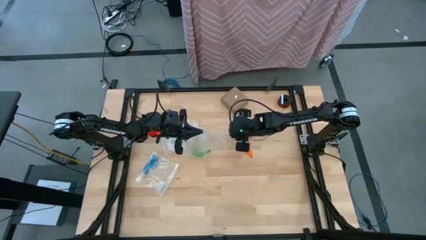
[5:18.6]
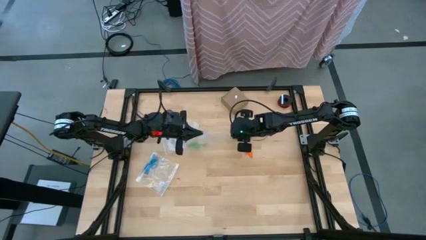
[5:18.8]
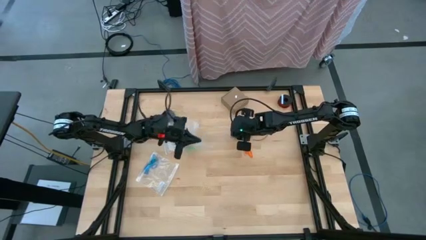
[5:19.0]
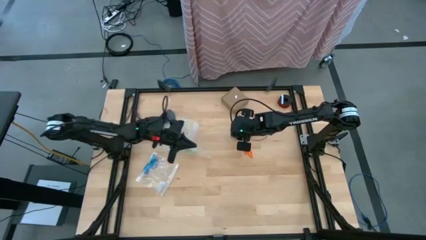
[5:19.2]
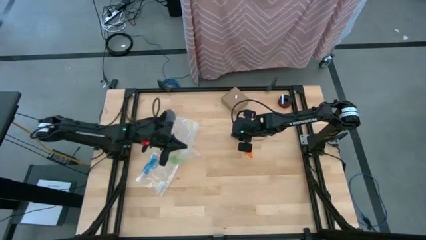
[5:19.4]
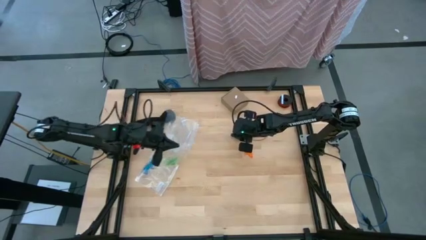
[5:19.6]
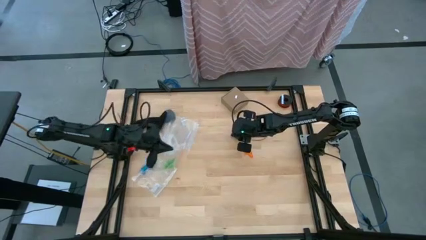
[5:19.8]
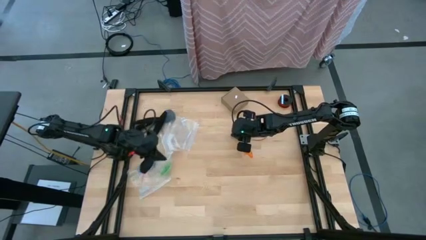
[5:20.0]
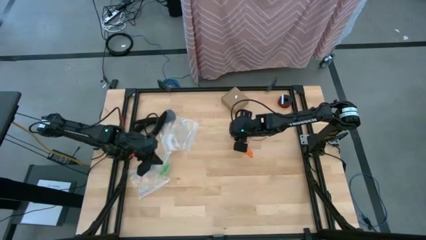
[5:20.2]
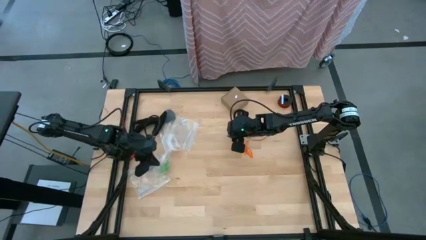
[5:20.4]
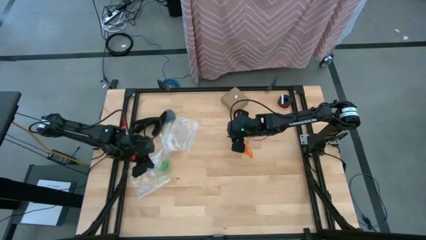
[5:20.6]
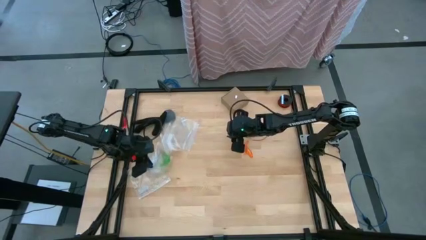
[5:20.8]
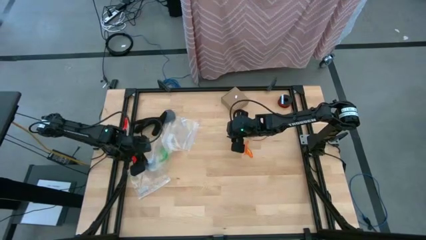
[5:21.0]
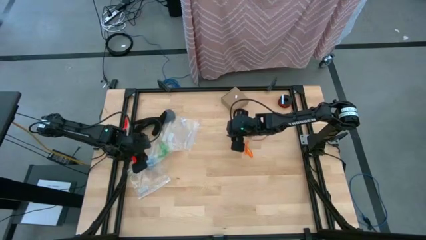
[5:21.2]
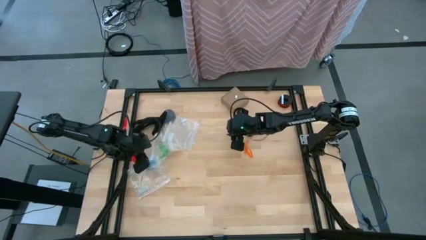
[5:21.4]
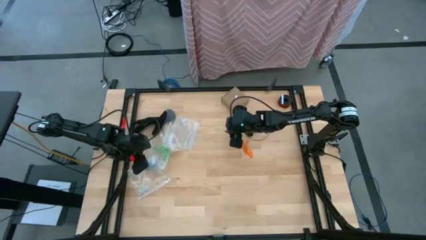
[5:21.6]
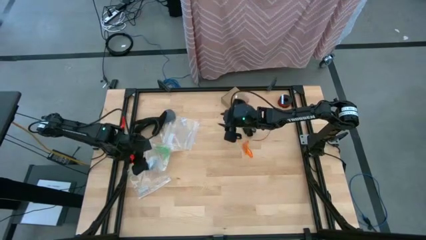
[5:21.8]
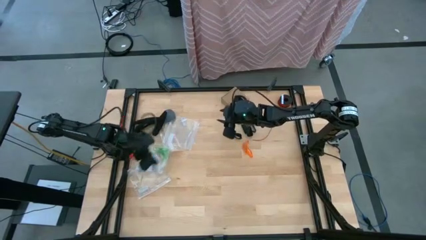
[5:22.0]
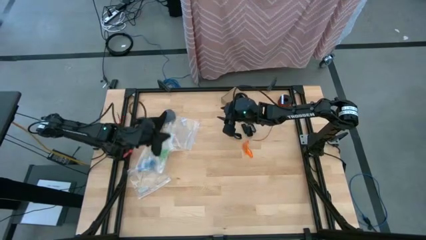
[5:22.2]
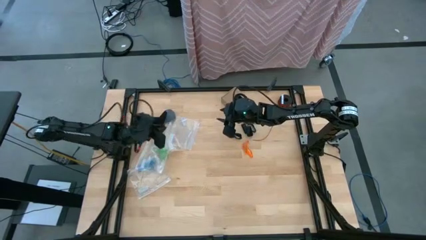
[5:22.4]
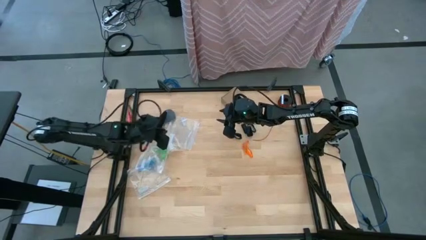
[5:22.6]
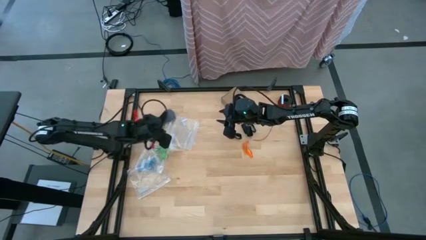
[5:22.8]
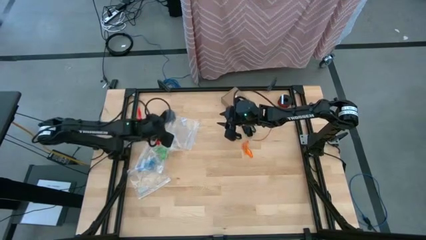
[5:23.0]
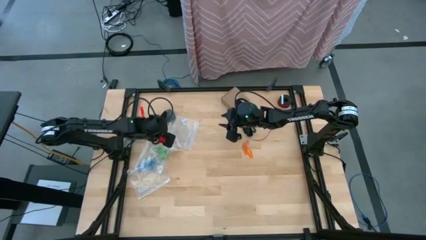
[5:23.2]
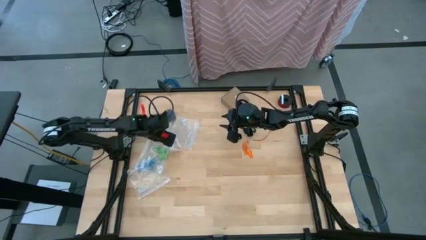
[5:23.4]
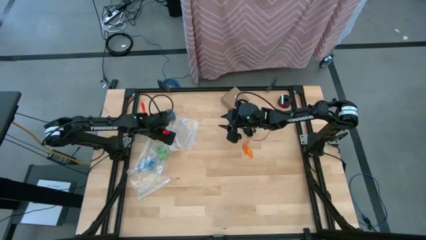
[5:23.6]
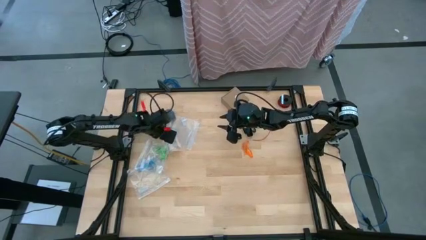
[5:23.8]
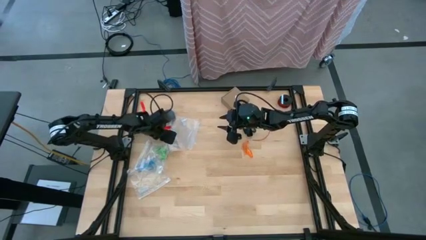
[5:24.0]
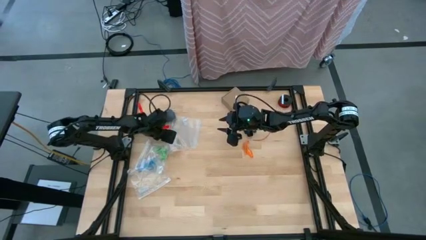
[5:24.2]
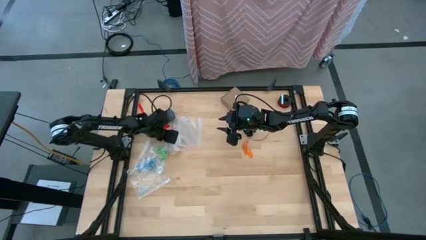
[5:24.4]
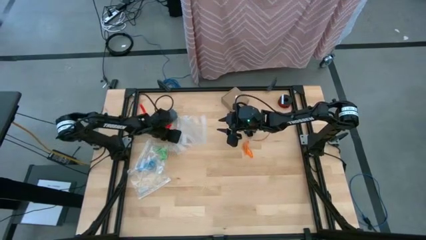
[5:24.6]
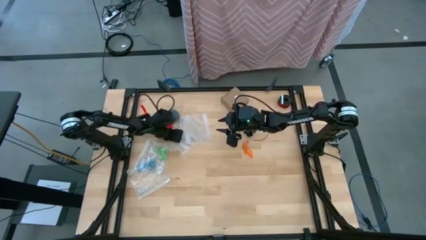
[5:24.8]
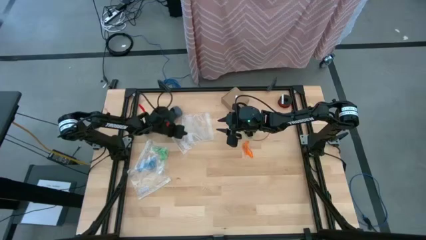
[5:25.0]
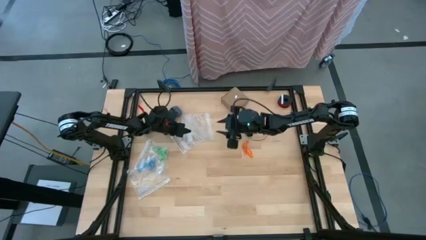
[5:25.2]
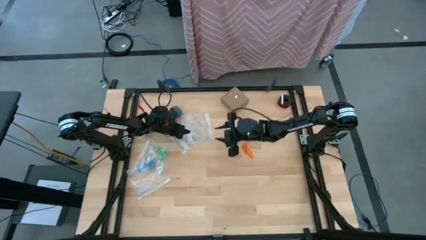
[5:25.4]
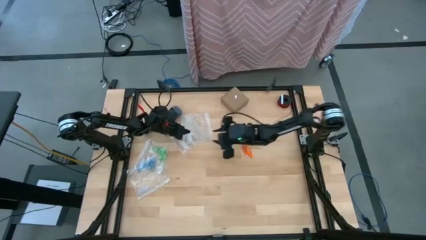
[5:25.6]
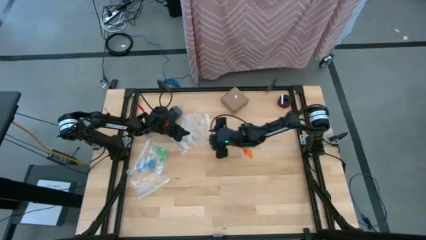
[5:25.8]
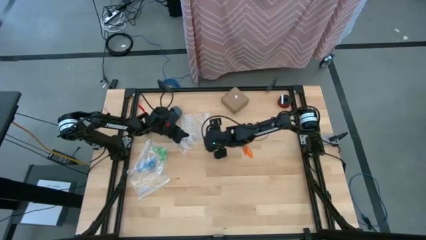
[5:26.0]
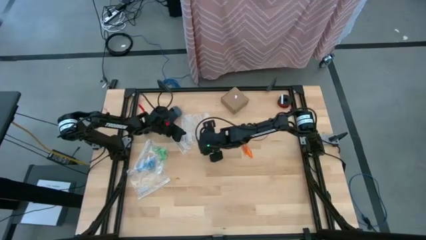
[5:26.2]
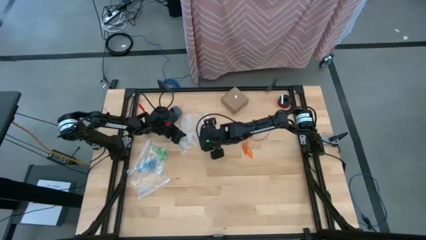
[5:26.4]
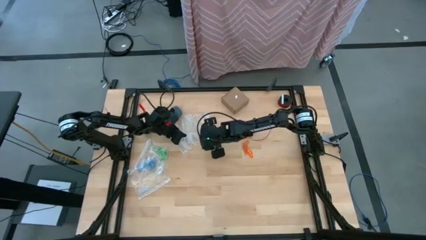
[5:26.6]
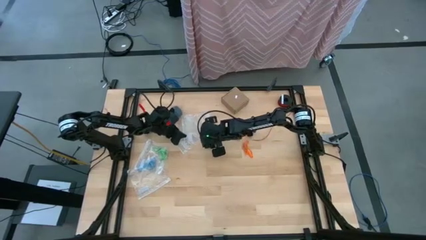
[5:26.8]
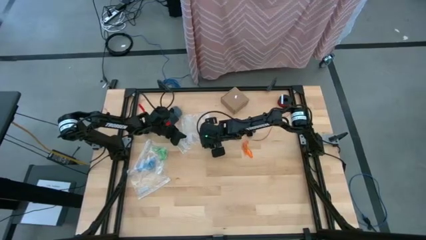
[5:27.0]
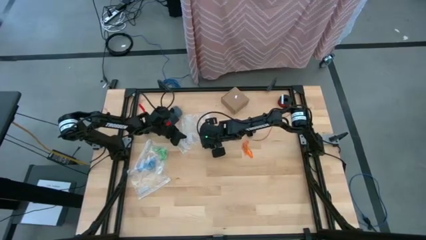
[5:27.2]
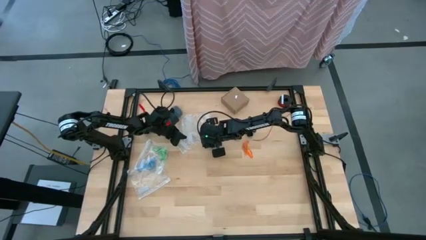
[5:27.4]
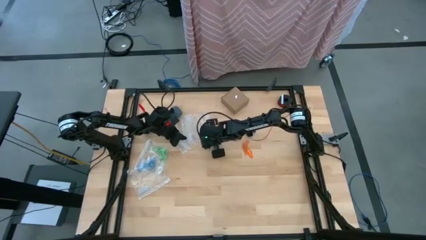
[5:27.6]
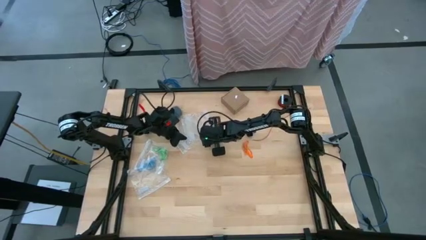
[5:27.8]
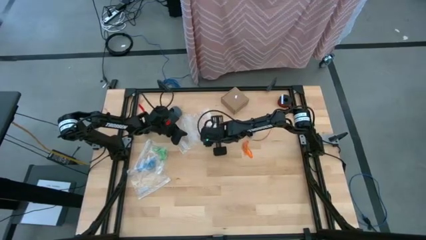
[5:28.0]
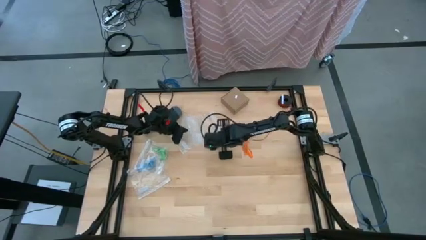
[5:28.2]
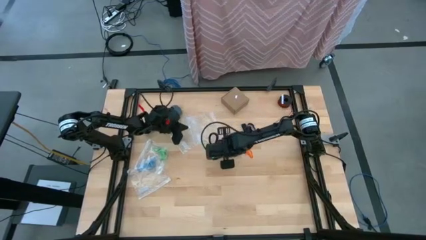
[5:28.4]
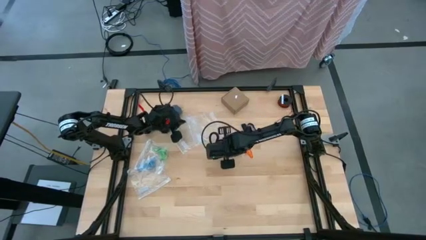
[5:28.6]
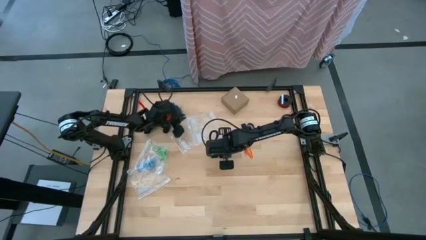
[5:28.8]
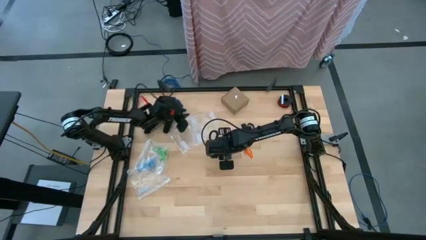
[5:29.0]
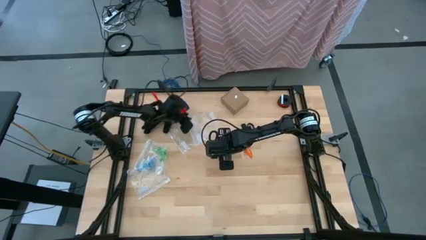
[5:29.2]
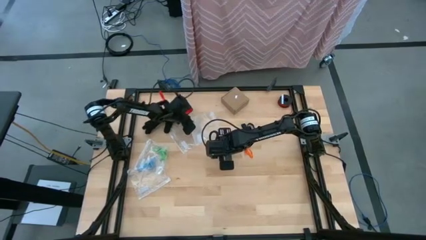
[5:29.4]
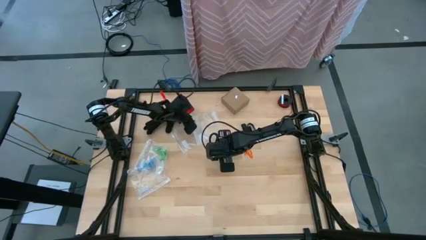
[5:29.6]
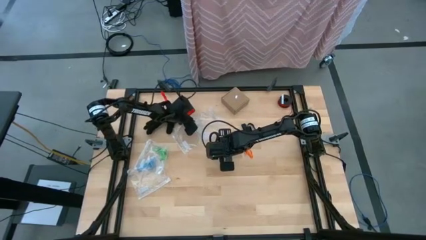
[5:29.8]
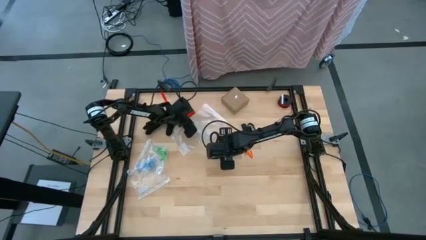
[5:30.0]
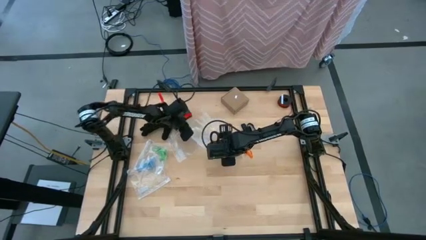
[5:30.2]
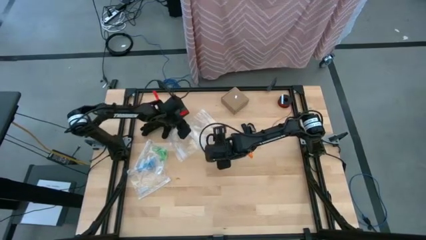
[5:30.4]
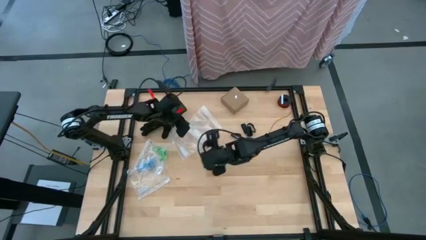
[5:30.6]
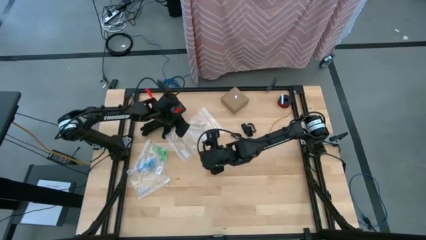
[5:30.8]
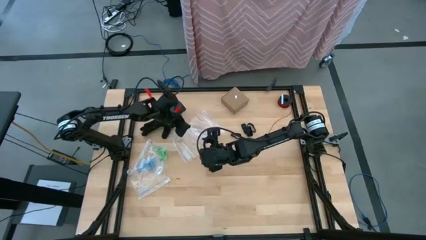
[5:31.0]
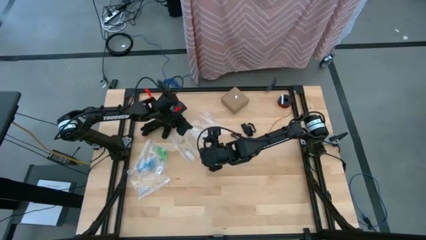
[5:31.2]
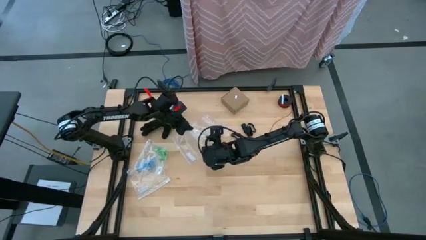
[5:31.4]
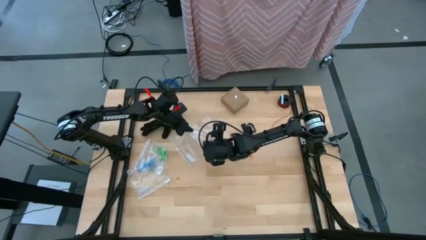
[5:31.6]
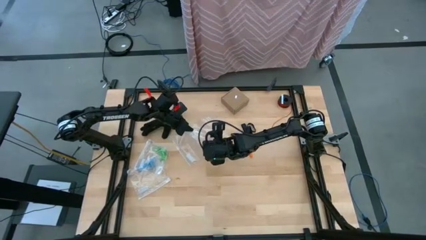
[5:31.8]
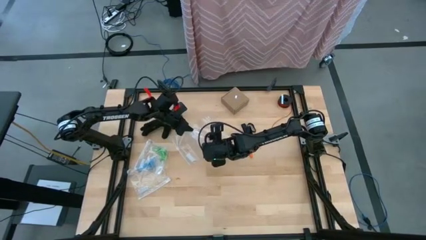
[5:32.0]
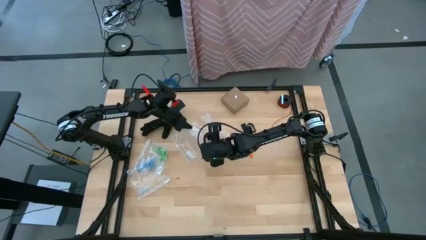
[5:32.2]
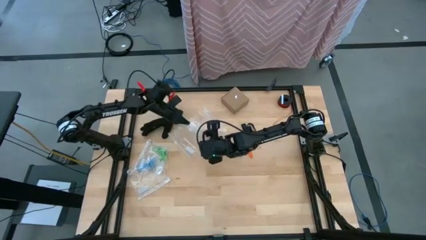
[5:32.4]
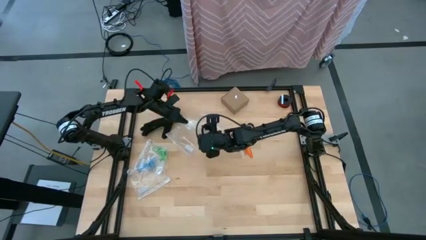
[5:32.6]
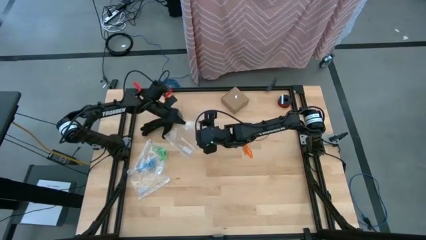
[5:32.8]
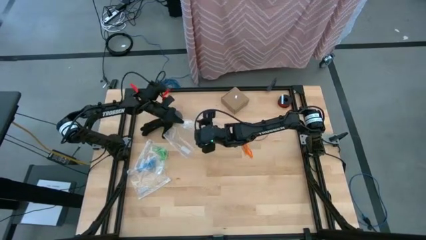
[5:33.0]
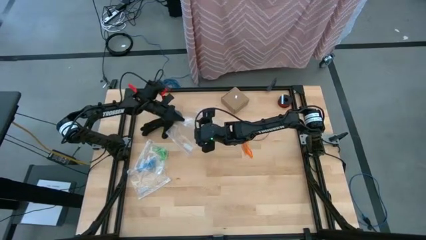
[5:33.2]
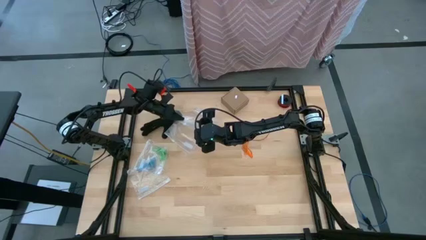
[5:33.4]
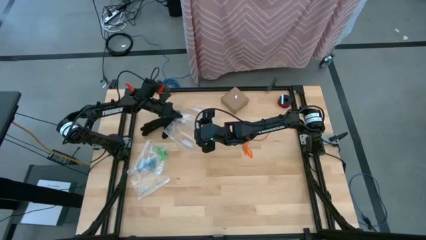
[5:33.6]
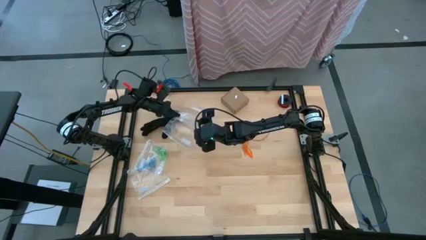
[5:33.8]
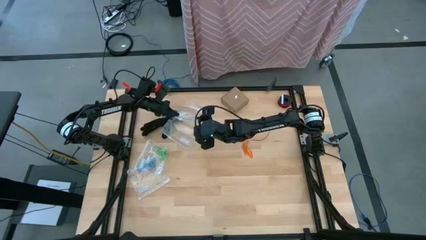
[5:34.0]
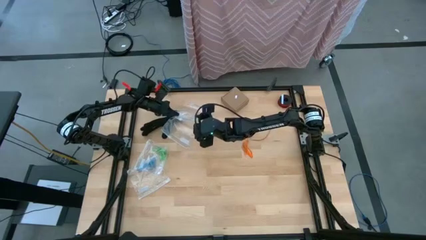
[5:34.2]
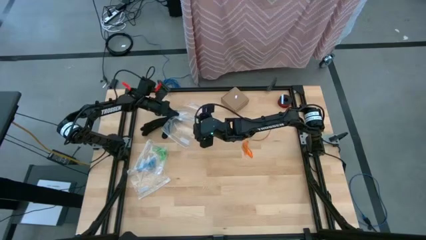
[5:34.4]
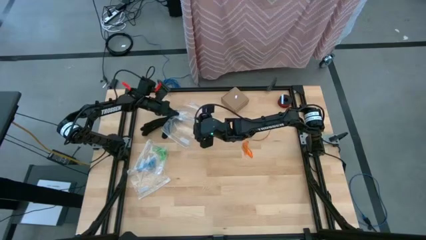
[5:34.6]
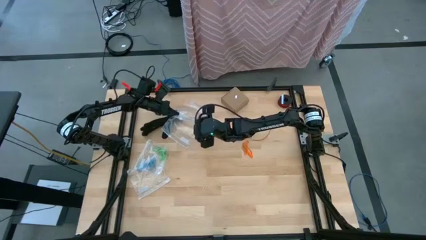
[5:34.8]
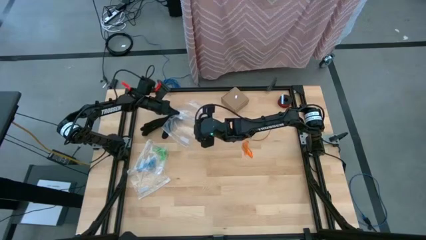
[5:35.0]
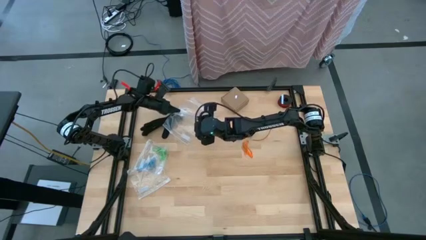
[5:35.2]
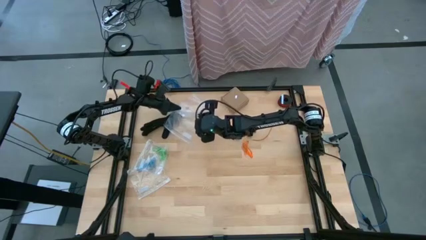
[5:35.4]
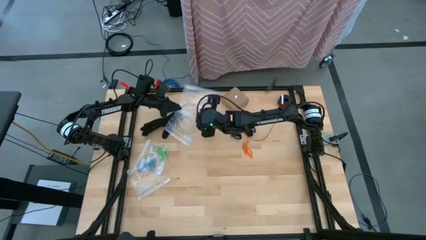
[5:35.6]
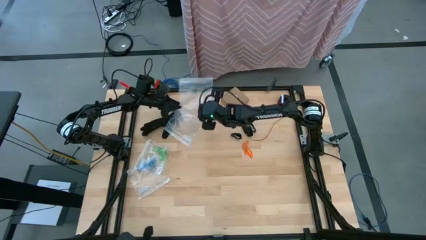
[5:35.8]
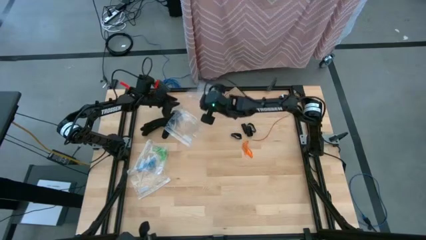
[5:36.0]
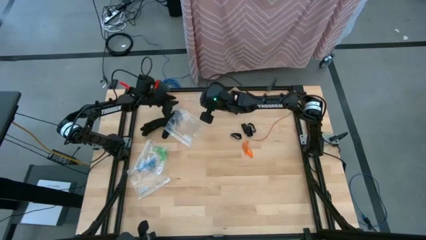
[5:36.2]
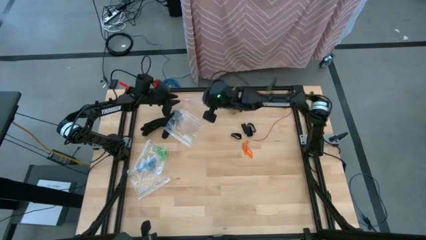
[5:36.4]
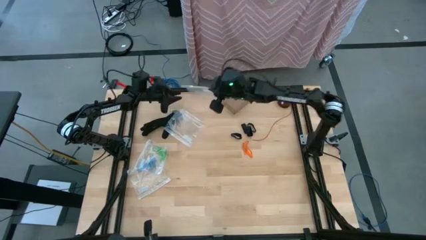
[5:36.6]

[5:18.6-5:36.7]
Task: Sort rubber bands
Open the transparent zip bag
